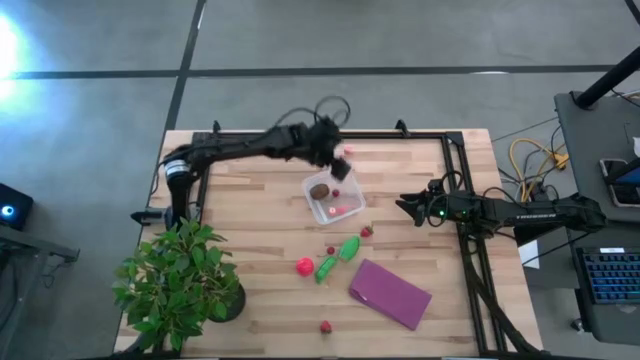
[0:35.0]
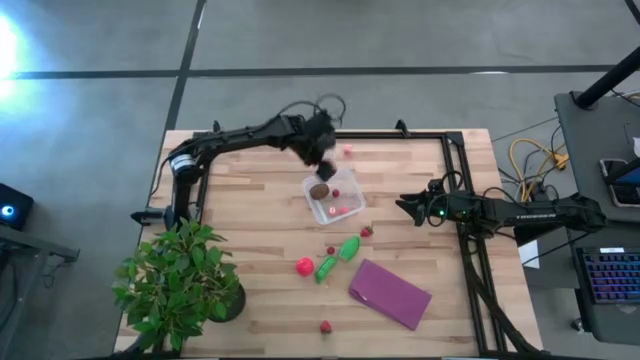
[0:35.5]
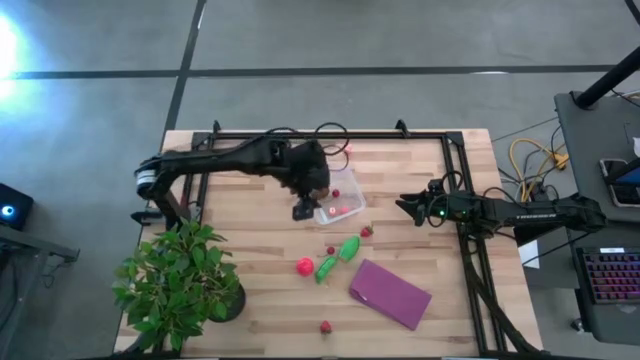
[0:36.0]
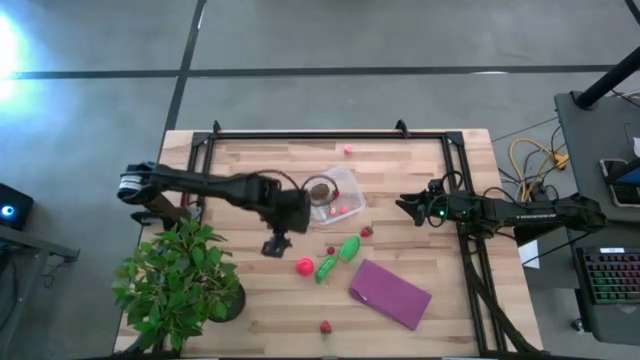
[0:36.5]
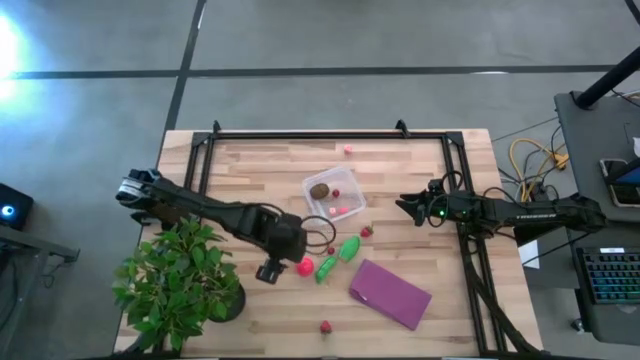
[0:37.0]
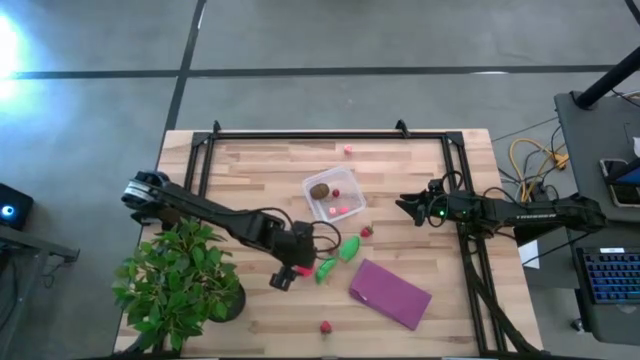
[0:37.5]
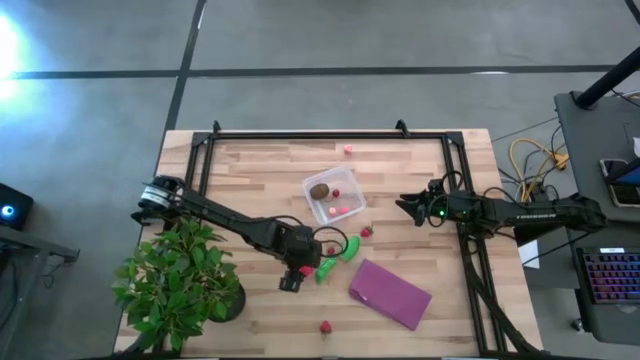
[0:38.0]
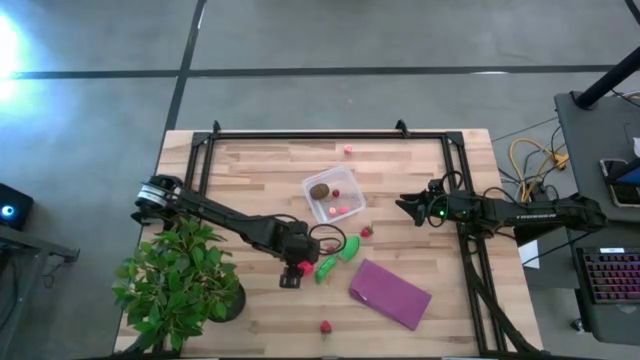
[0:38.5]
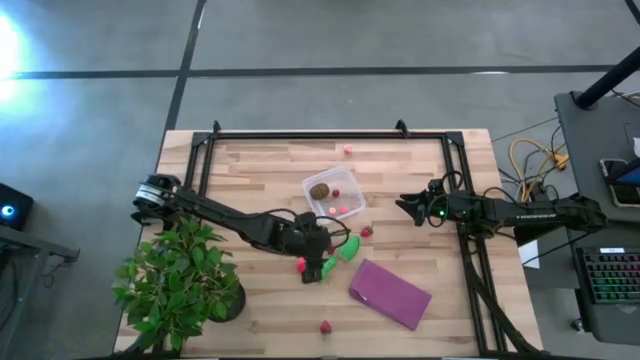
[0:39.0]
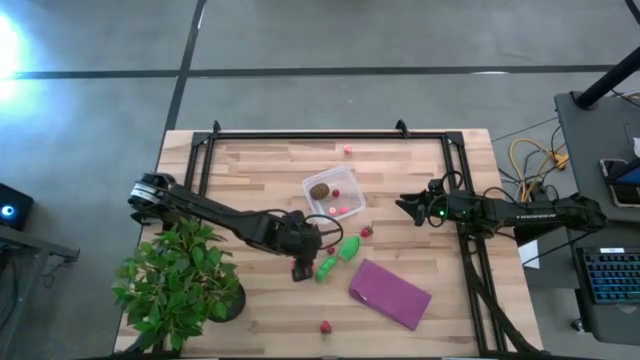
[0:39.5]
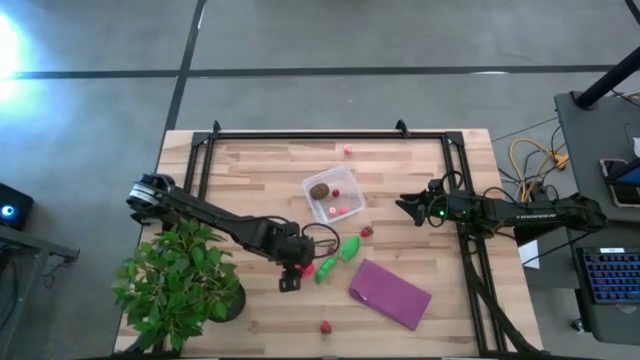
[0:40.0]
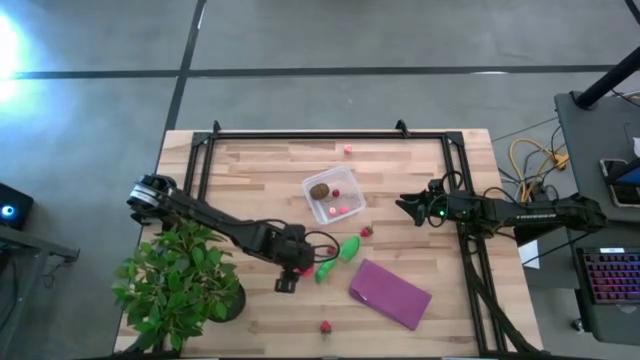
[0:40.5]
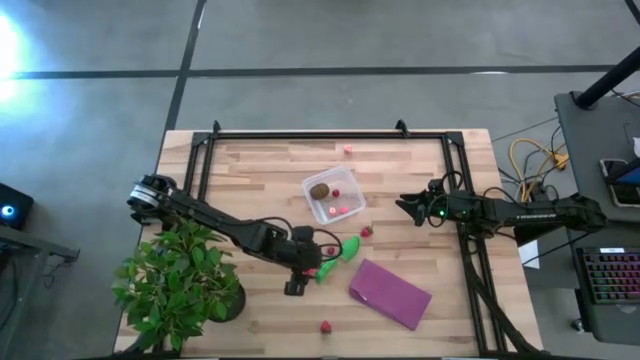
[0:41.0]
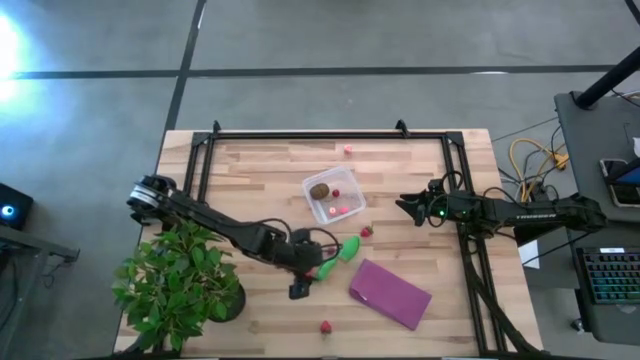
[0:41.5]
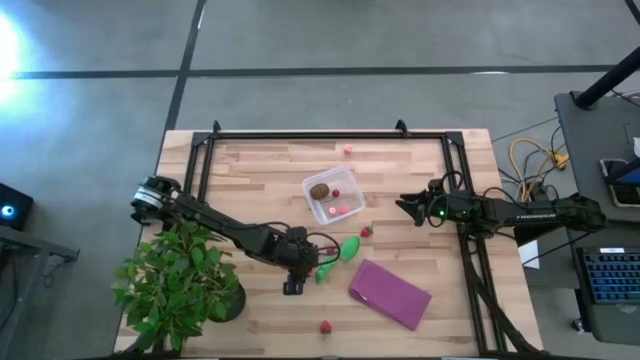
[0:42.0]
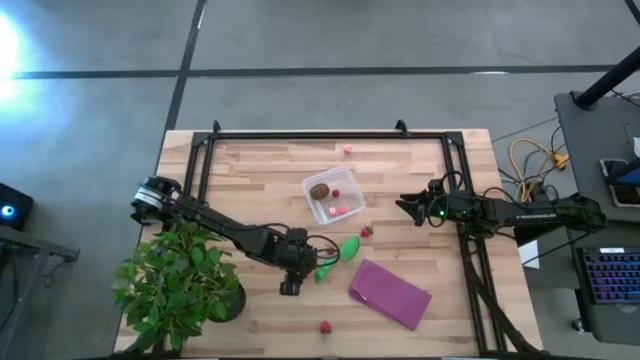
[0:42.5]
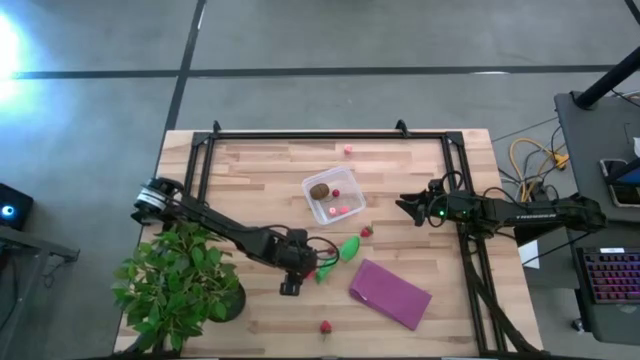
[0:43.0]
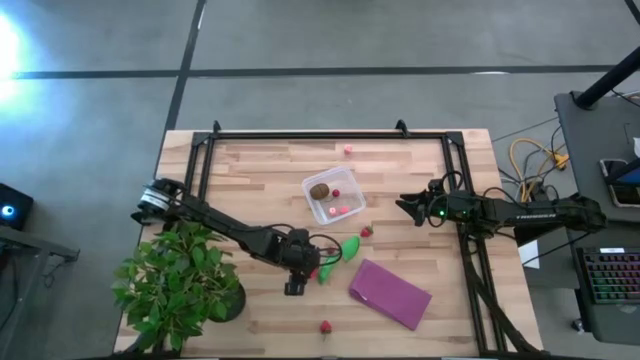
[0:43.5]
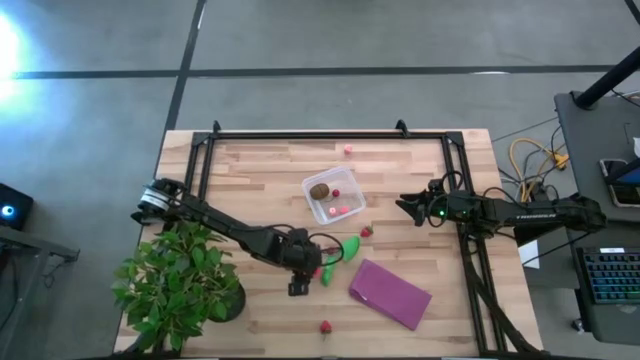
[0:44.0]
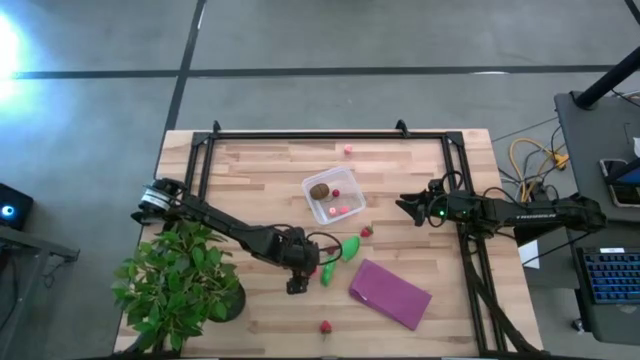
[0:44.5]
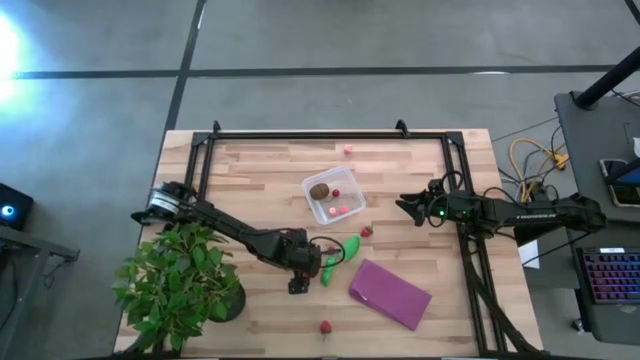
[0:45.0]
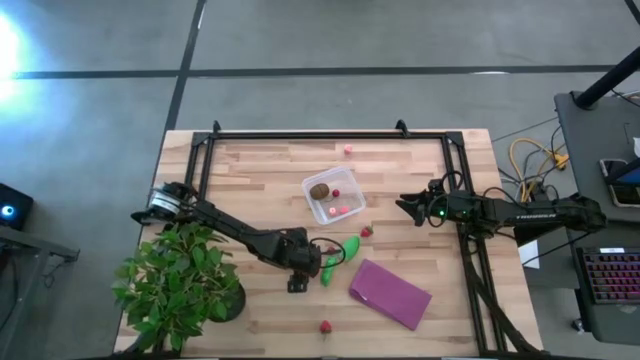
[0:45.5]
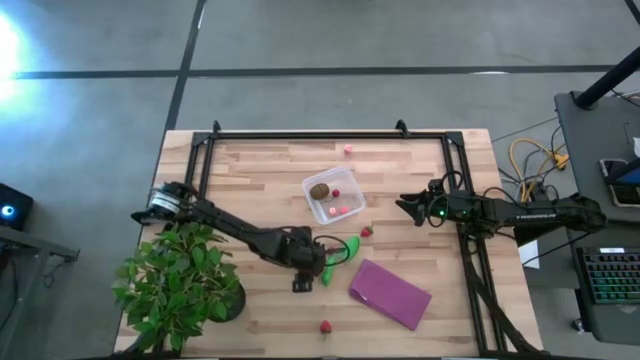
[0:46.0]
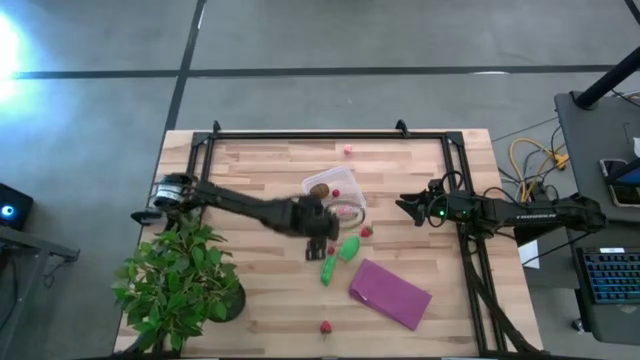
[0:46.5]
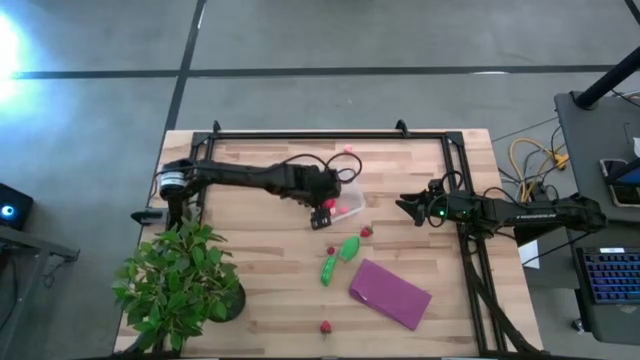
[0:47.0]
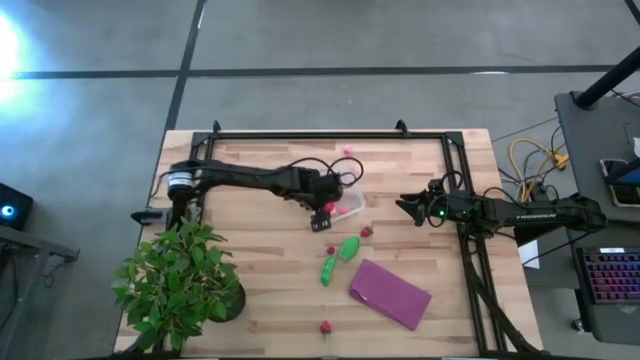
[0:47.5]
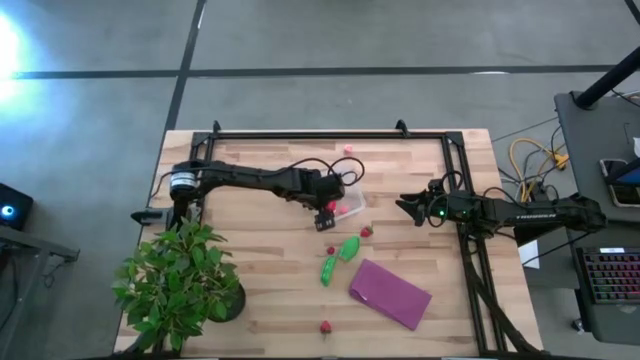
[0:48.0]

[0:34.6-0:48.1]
Task: Pick and placing Produce into tupperware
Put the red tomato into the transparent bin

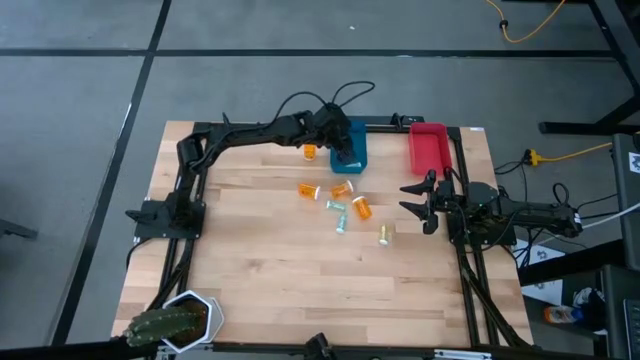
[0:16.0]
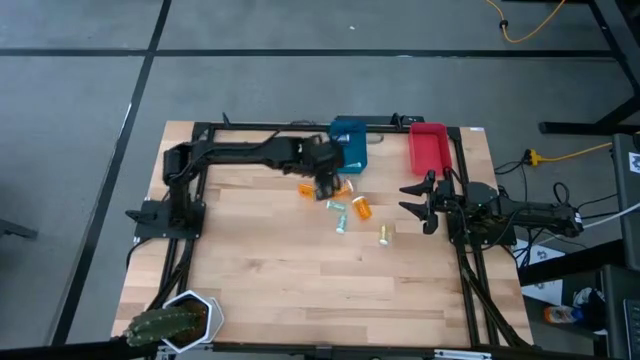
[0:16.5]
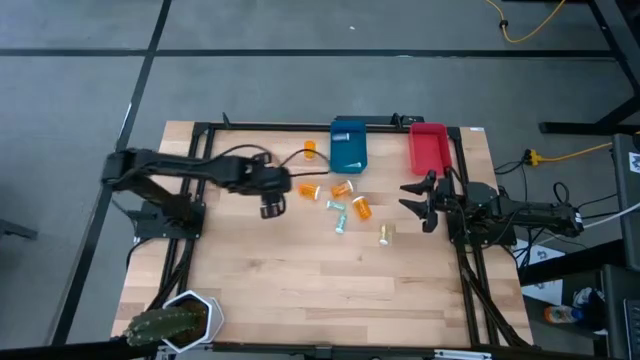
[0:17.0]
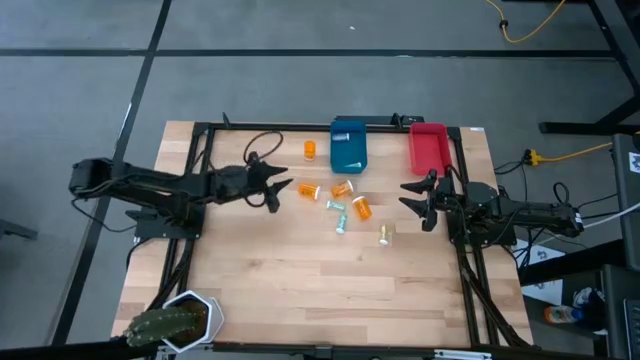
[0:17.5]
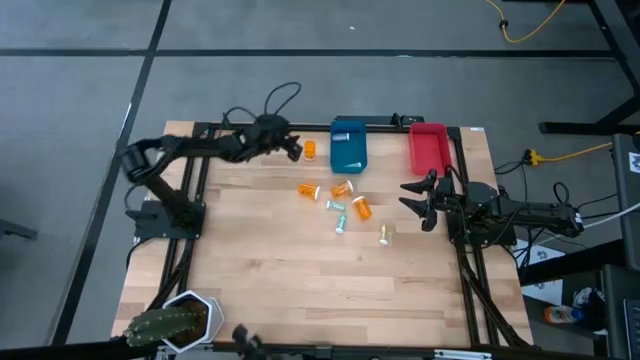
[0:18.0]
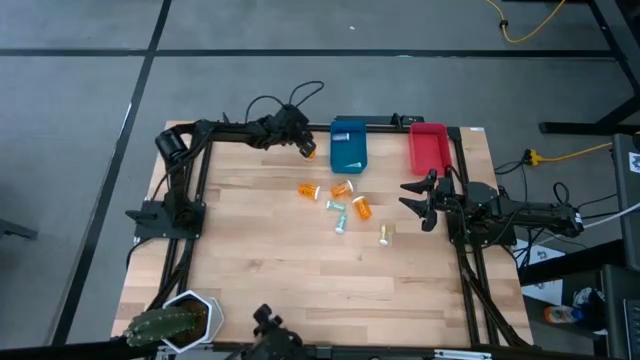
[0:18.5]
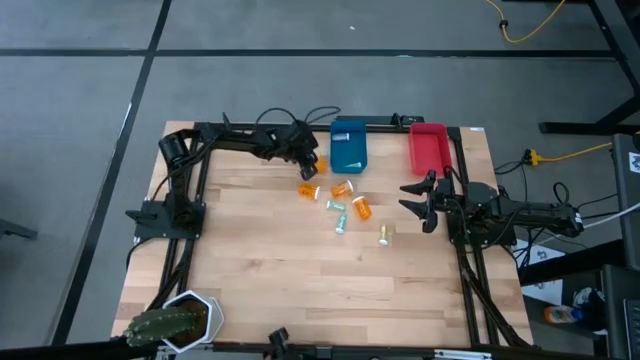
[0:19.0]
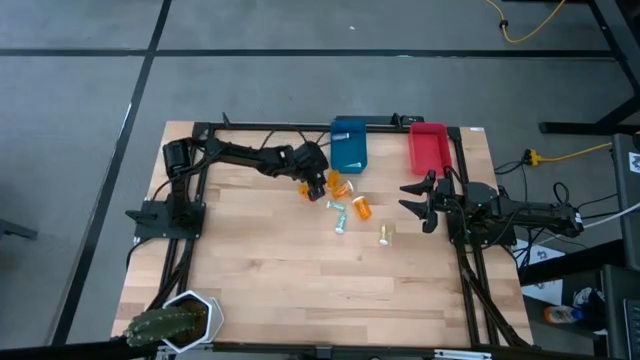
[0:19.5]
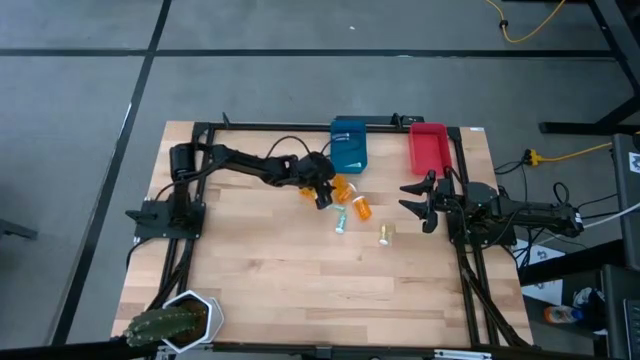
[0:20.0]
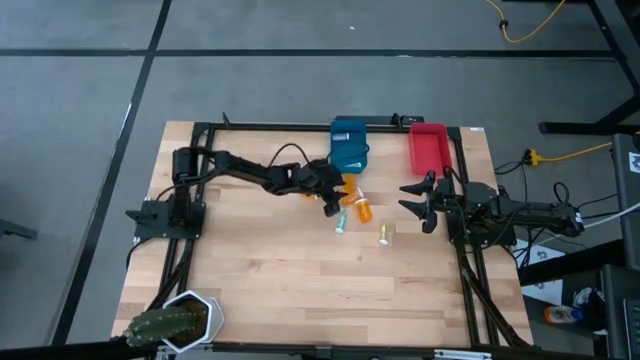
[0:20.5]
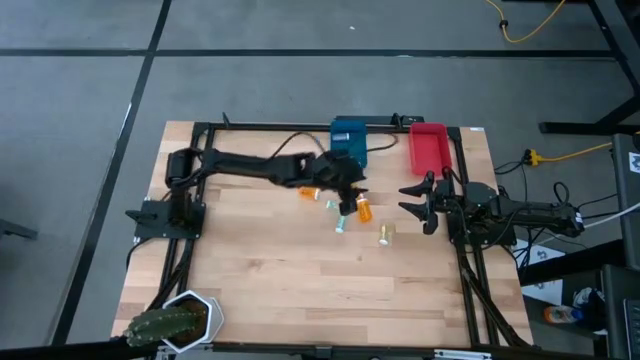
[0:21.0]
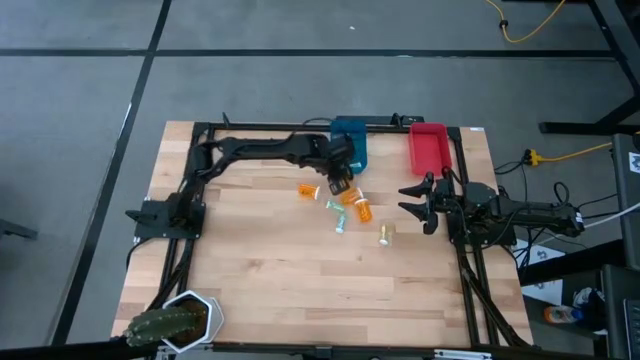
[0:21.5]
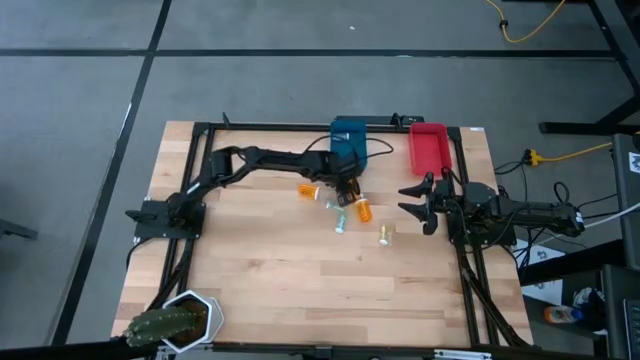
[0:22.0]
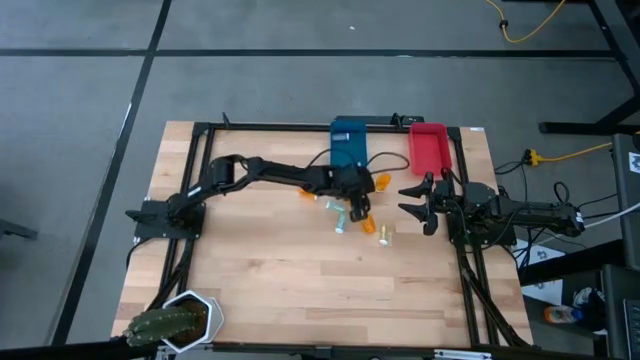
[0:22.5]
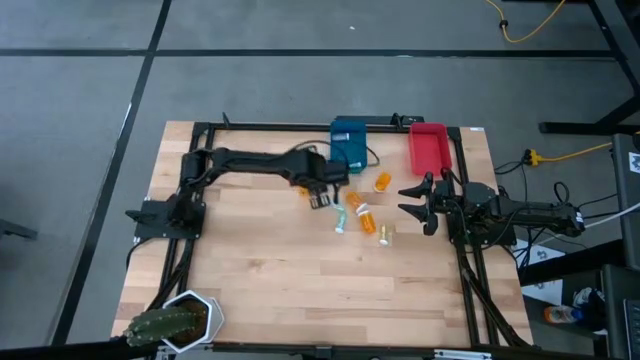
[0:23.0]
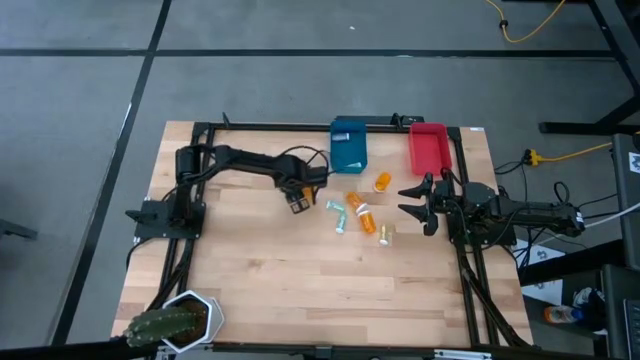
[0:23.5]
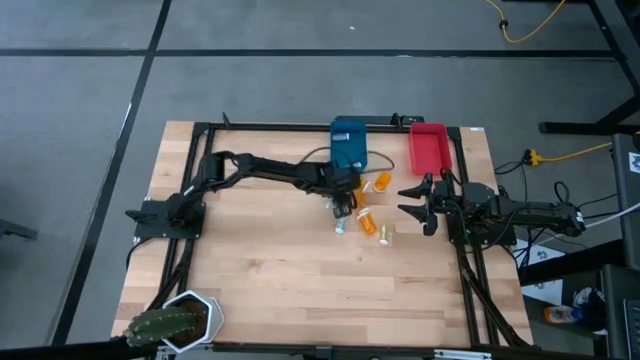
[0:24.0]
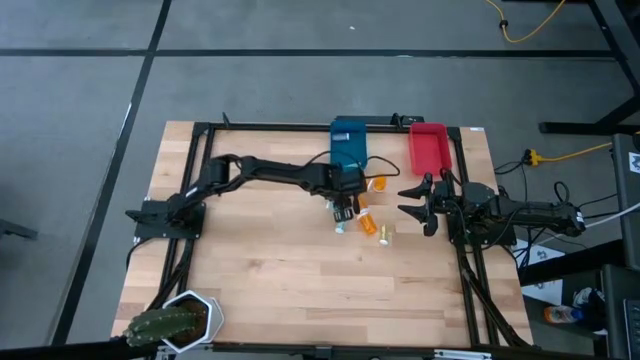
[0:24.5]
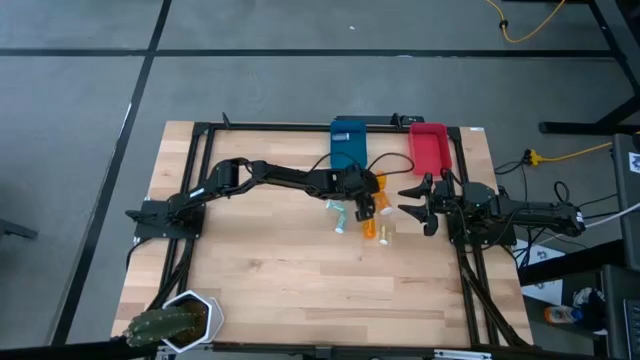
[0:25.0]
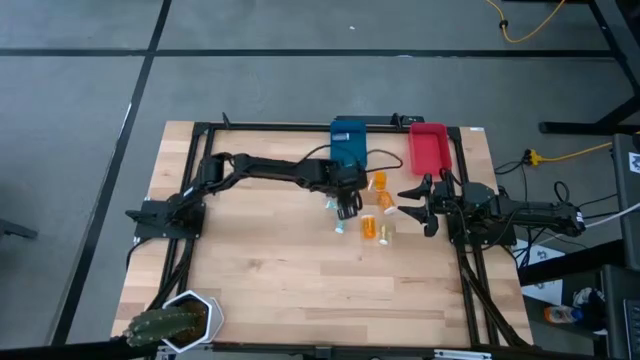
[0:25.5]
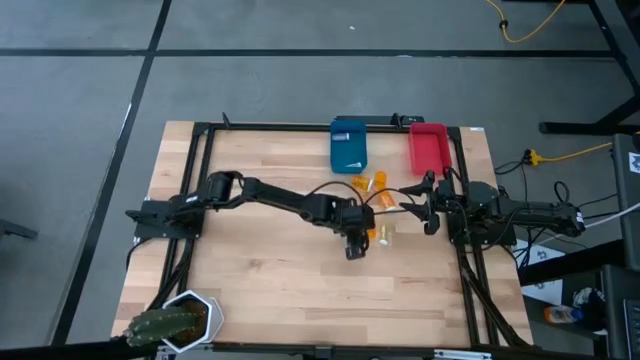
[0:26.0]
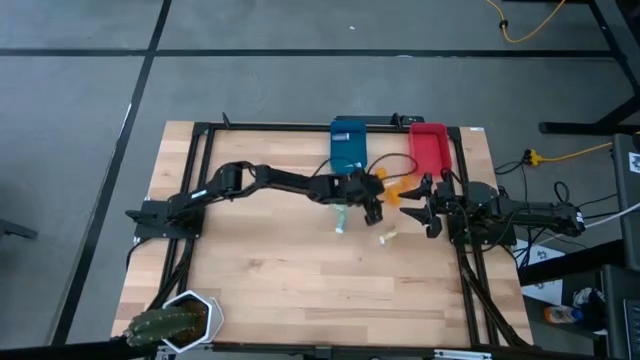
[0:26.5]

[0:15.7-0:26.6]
Task: Pick and place medicine bottles into bin by pill shape (circle, oval)
Move the orange pill bottles to the left of the table
